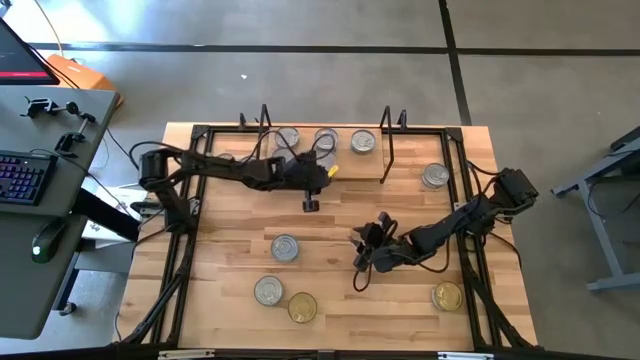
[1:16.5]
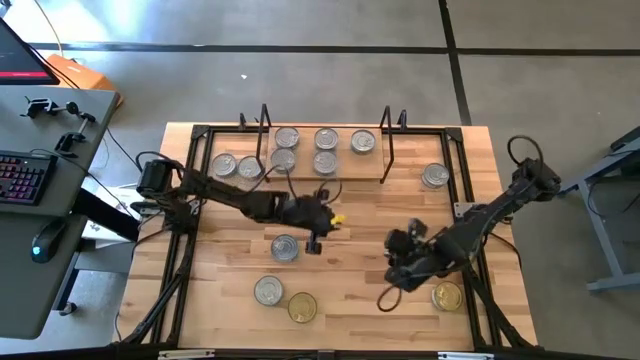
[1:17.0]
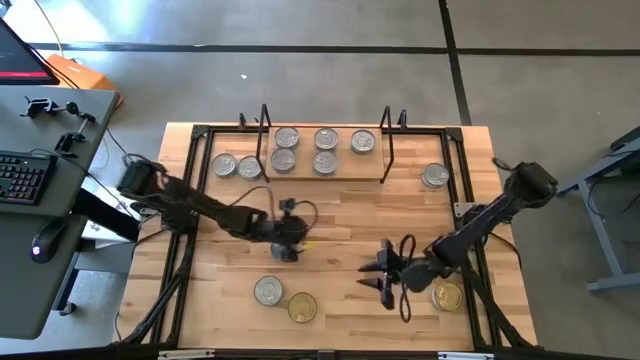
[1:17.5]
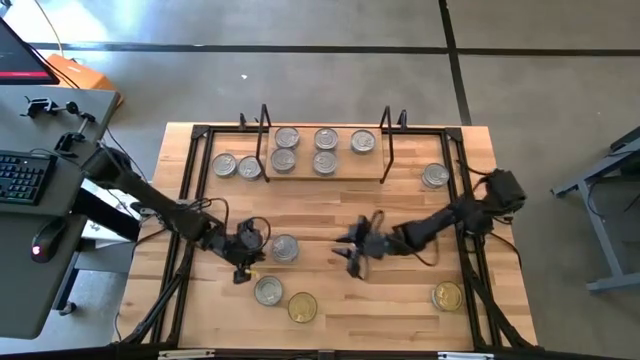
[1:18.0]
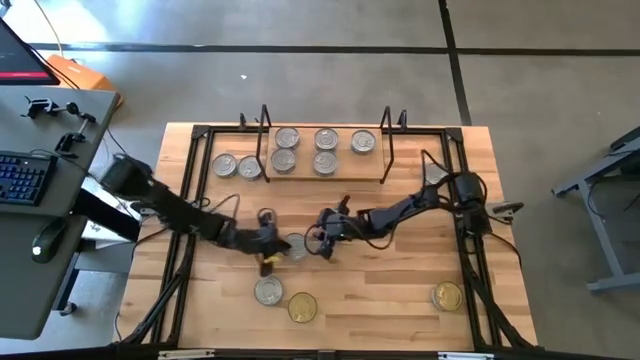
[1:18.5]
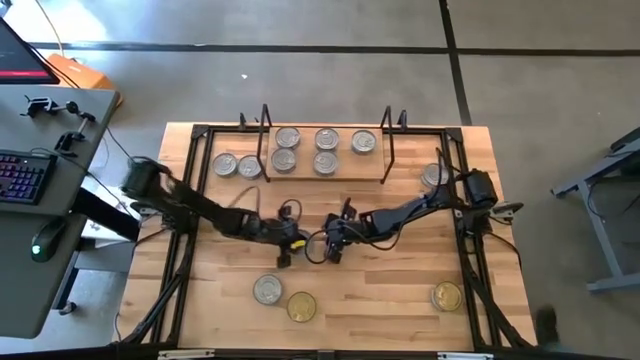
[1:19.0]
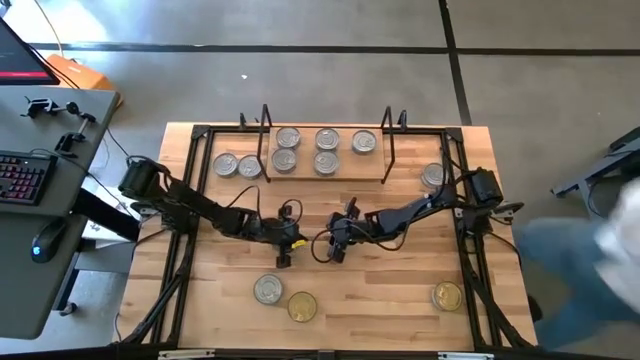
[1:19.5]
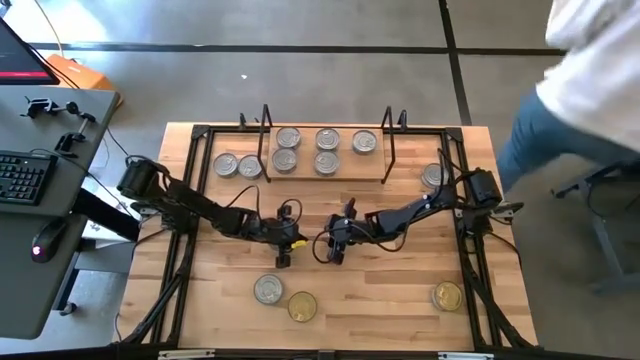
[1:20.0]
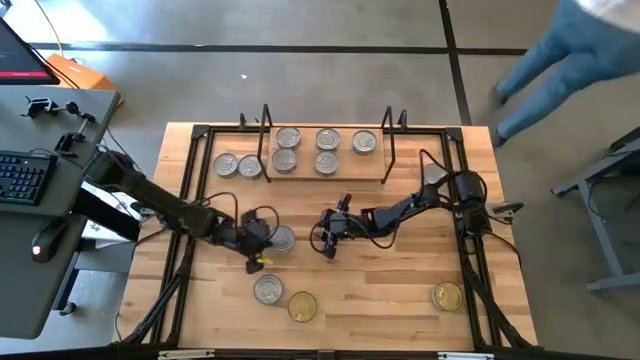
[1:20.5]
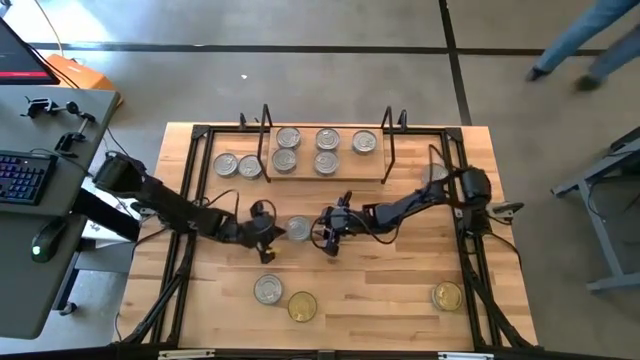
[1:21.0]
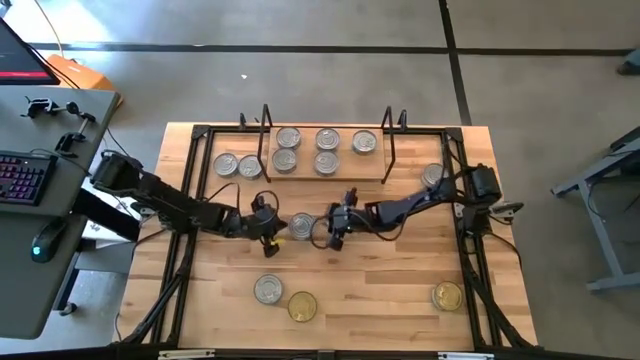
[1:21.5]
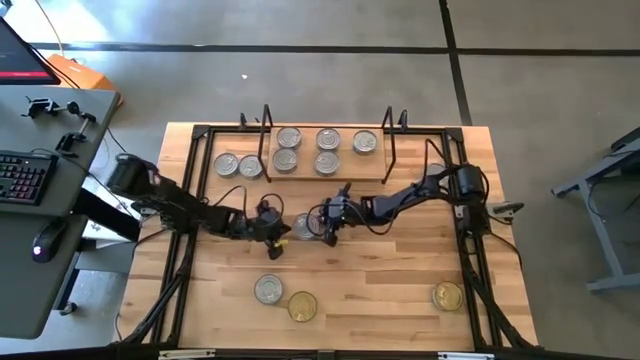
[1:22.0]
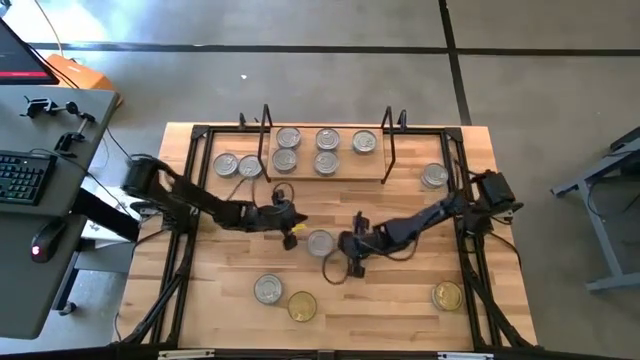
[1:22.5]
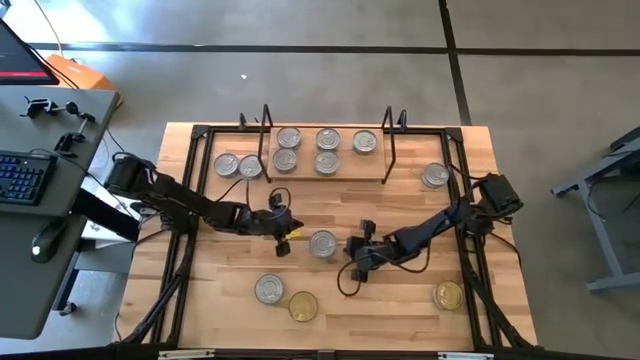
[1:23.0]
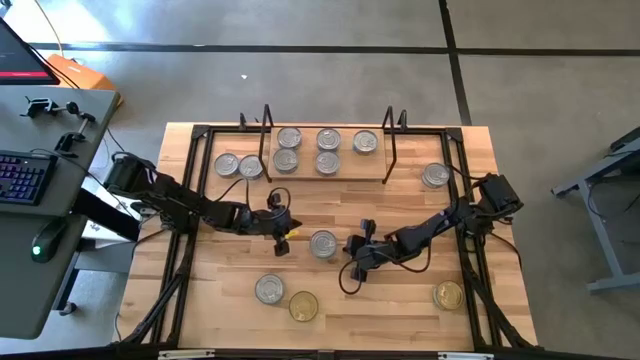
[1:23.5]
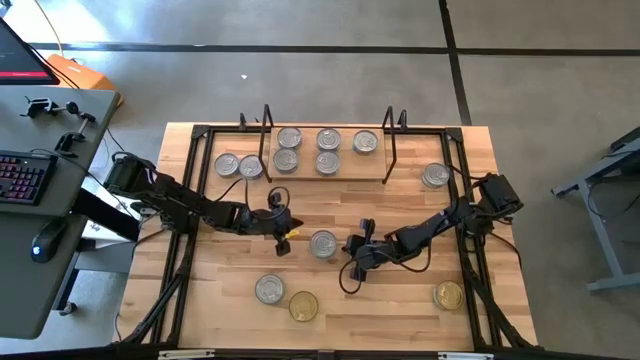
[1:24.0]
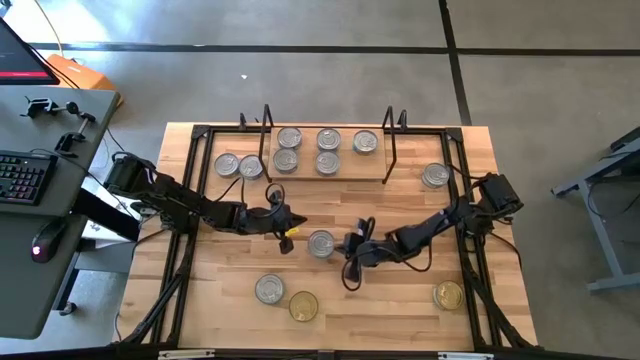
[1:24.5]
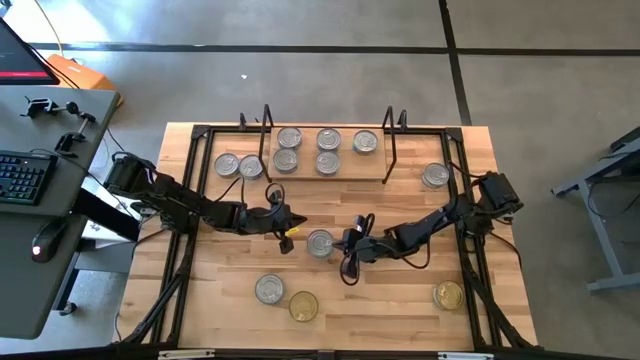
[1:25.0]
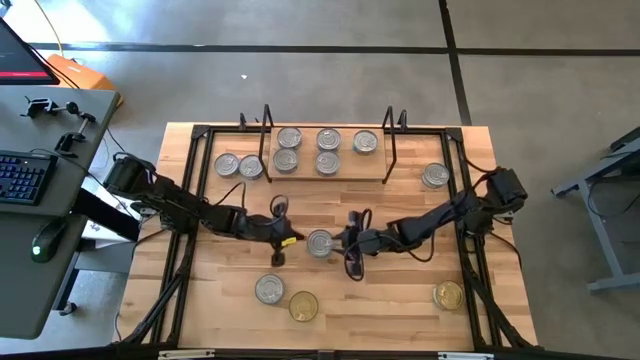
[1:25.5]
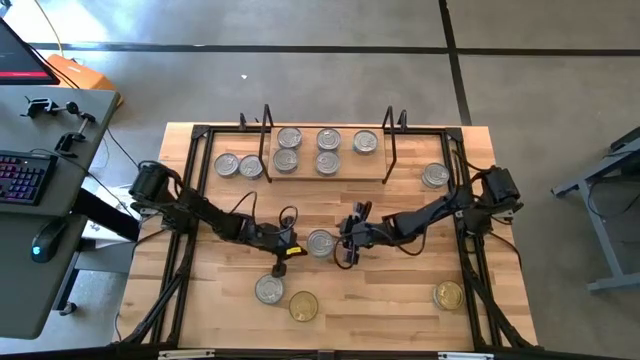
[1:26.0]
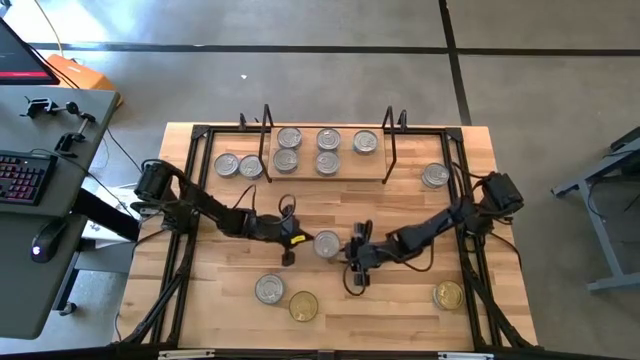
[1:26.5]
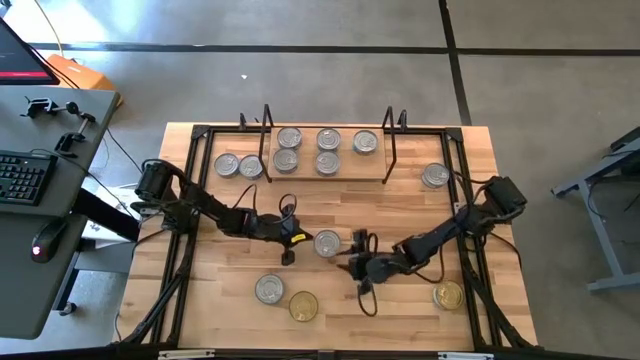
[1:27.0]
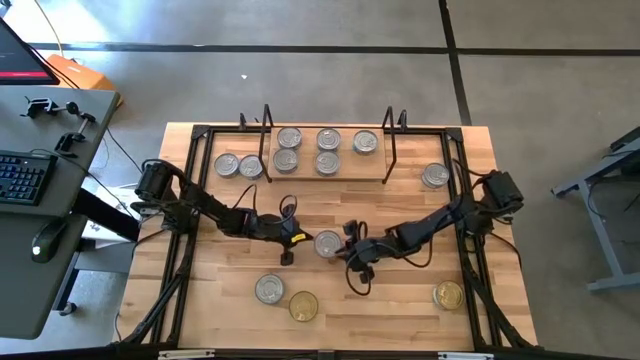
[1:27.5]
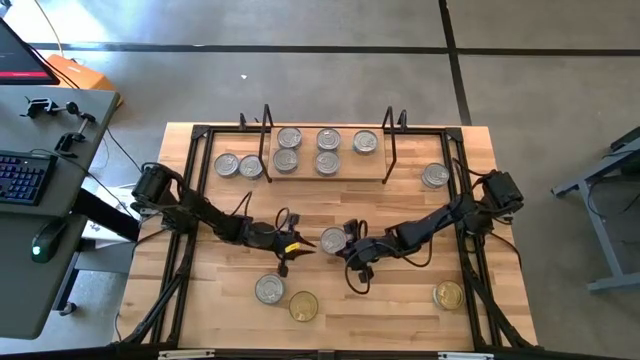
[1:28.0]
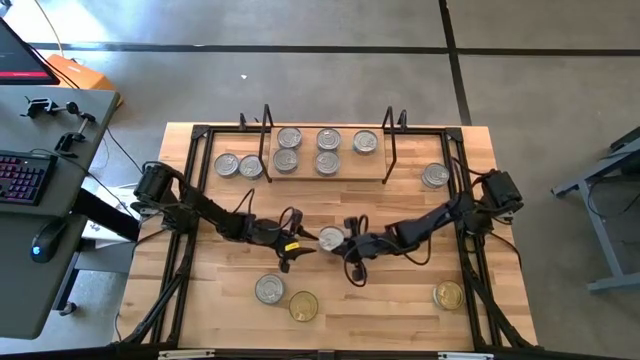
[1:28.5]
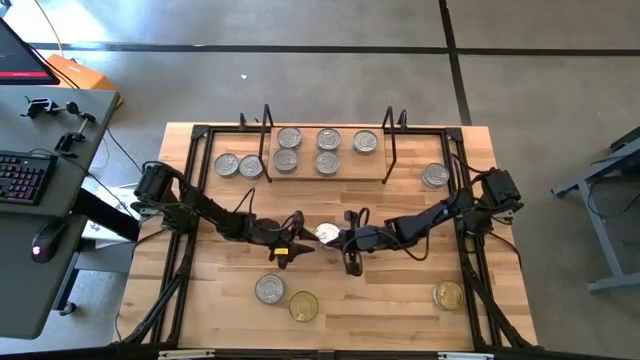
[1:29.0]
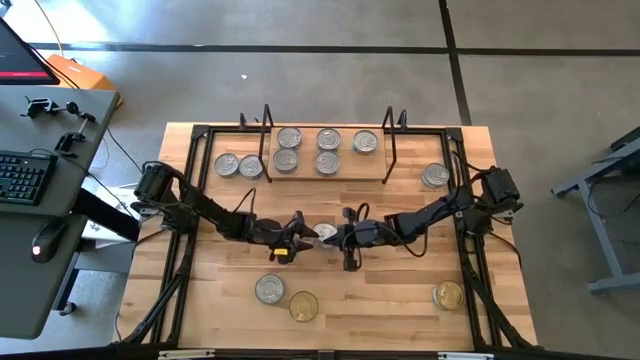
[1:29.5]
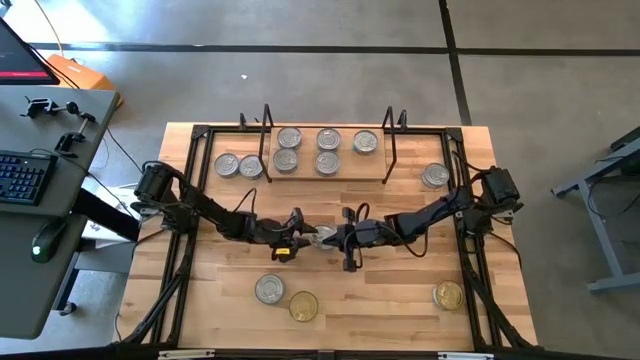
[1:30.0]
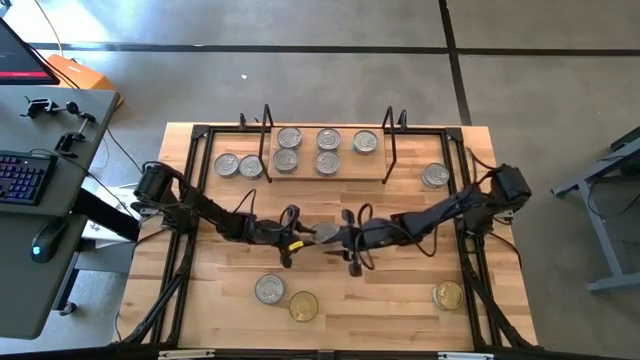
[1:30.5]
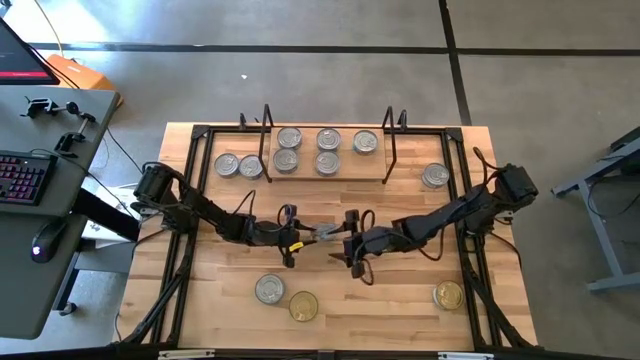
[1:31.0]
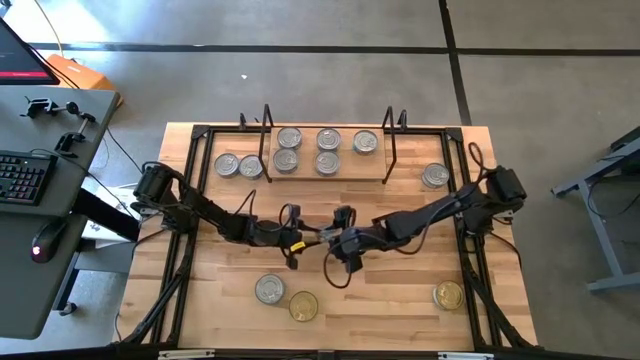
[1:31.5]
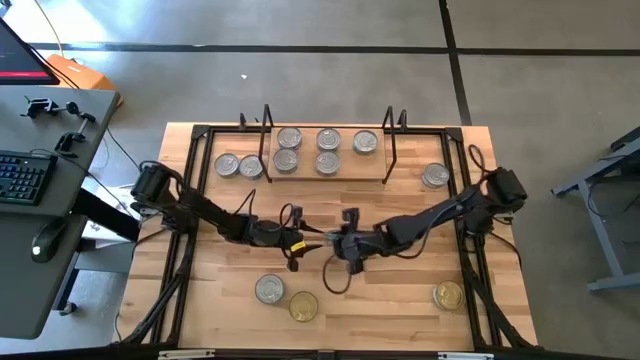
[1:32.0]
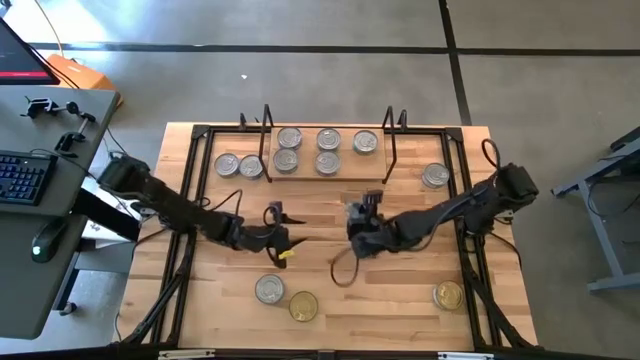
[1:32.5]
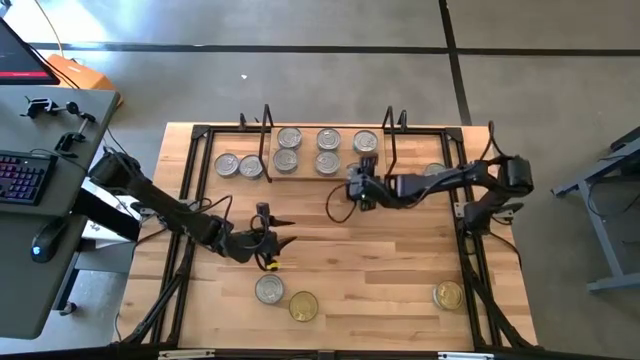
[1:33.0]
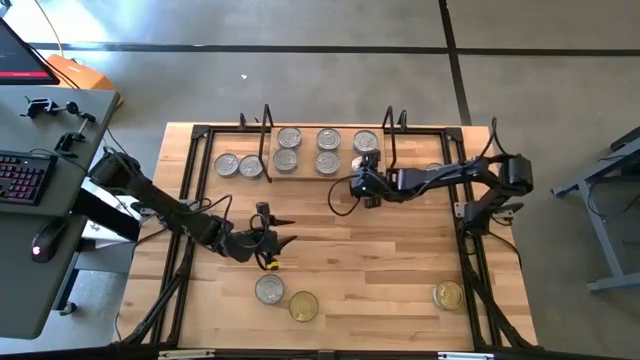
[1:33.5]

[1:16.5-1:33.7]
Task: Stack canned seafood by type on shelf
Put the Green-blue tuna can on the shelf

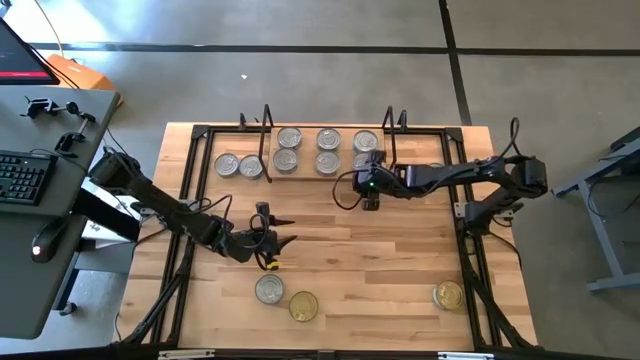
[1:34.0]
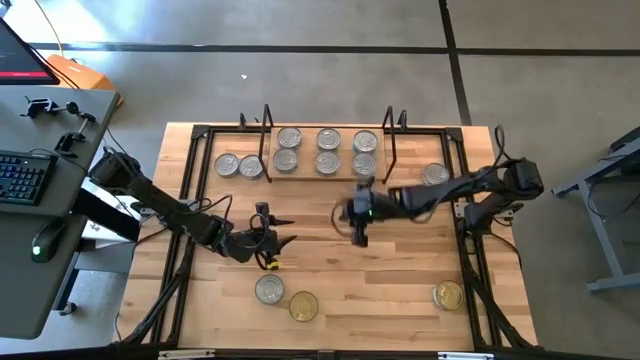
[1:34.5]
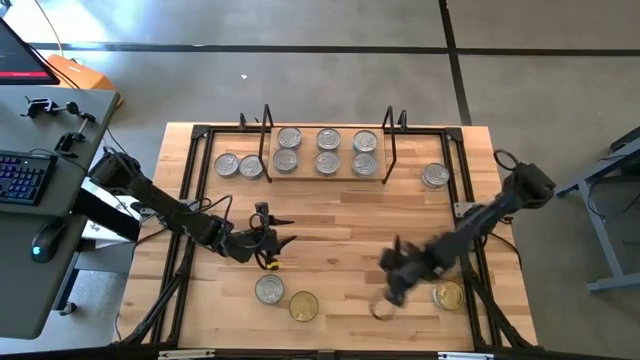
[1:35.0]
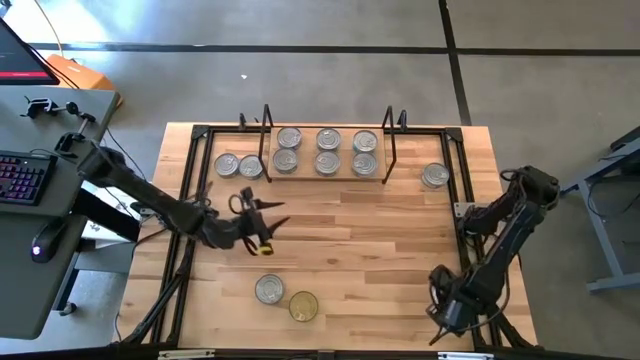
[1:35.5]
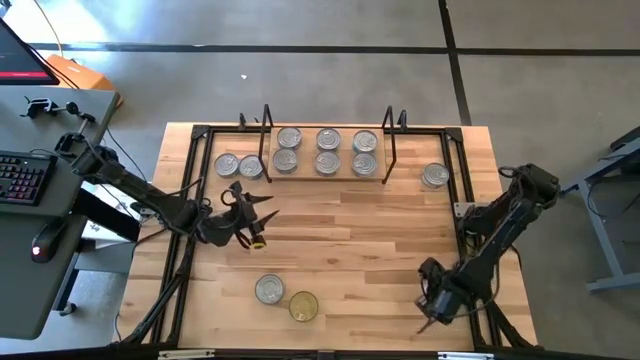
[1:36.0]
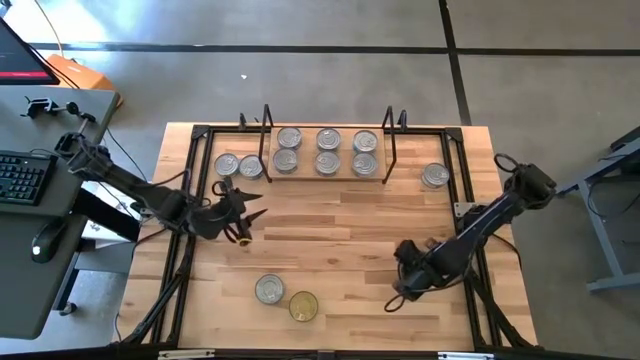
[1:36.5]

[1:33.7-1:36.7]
Move the green tuna can to the top
